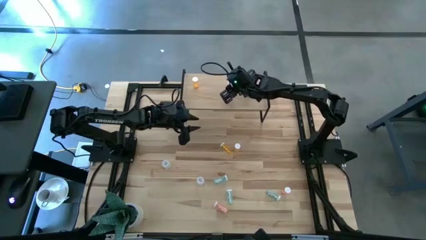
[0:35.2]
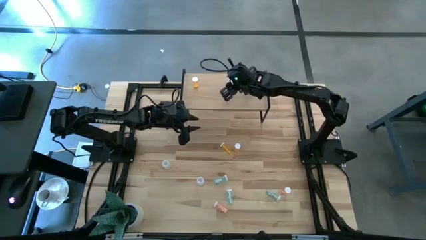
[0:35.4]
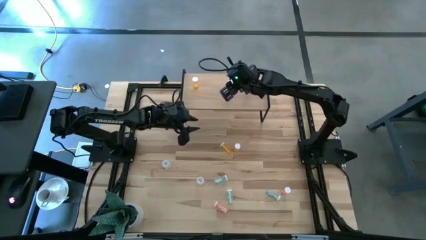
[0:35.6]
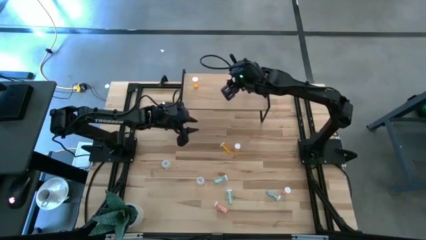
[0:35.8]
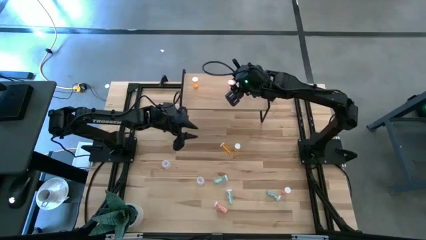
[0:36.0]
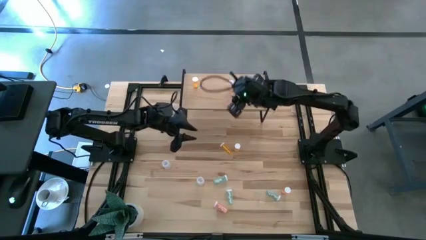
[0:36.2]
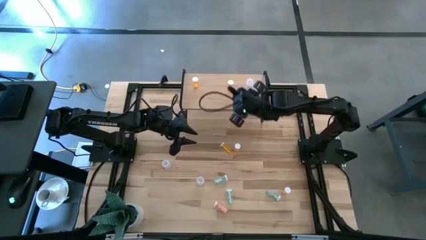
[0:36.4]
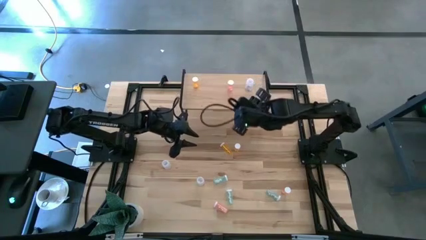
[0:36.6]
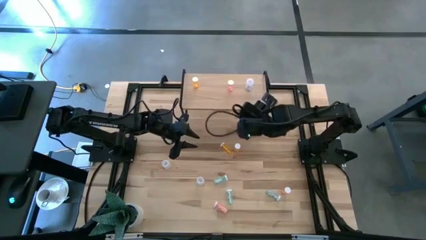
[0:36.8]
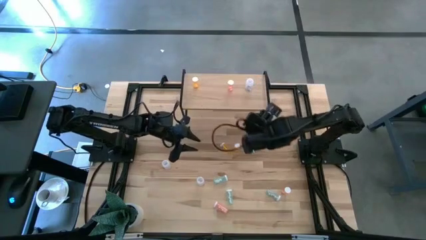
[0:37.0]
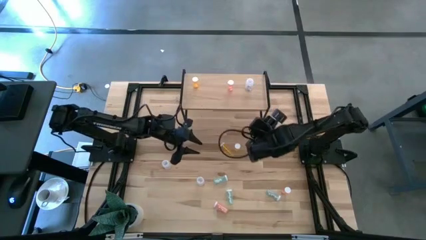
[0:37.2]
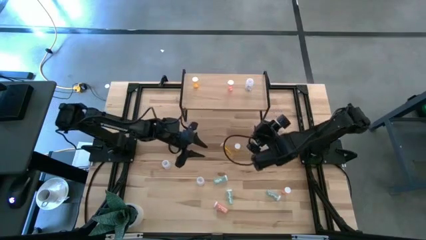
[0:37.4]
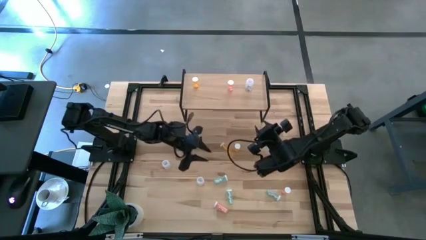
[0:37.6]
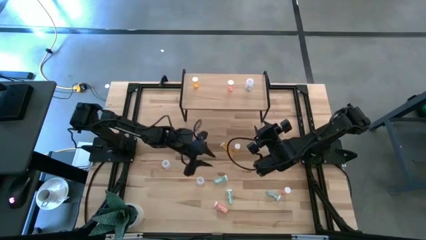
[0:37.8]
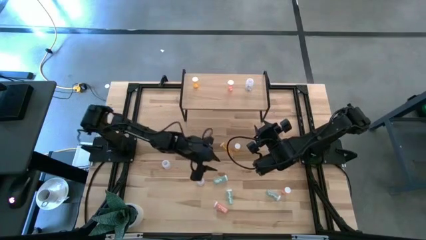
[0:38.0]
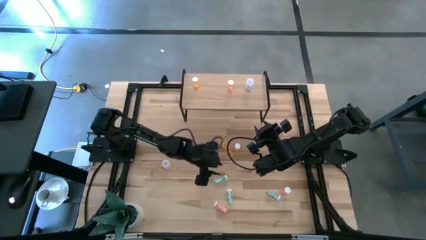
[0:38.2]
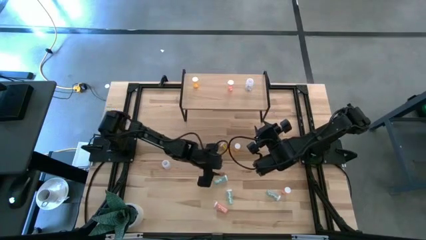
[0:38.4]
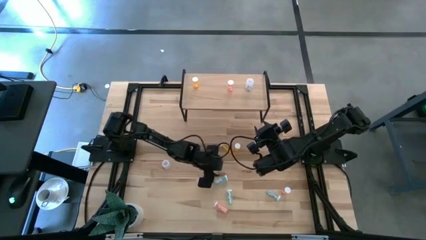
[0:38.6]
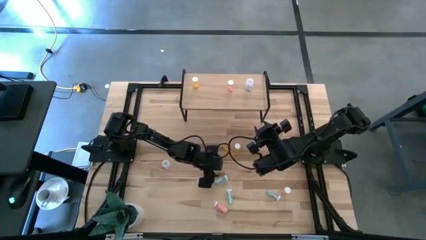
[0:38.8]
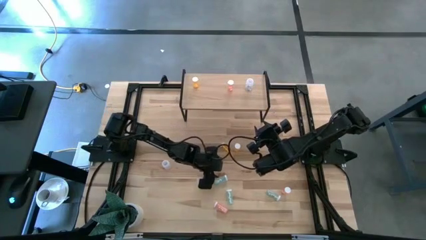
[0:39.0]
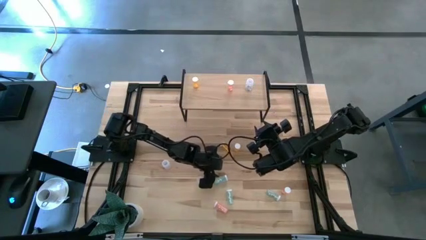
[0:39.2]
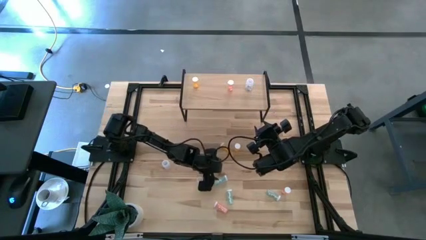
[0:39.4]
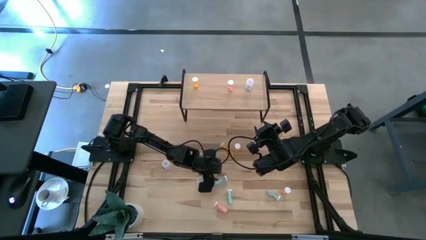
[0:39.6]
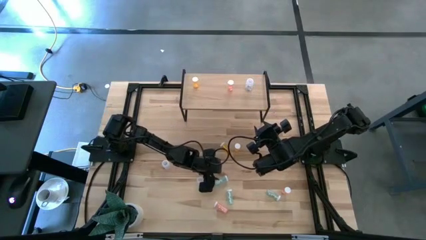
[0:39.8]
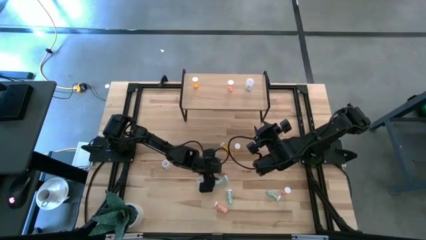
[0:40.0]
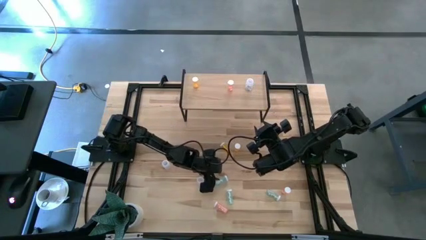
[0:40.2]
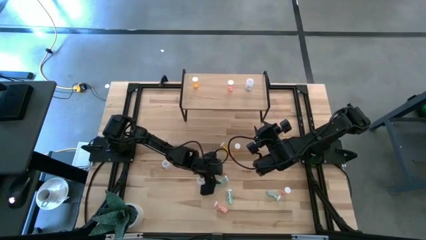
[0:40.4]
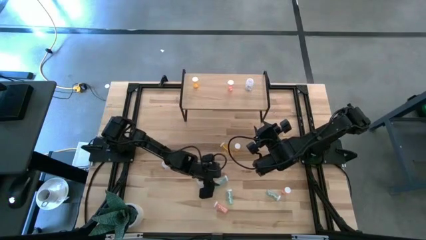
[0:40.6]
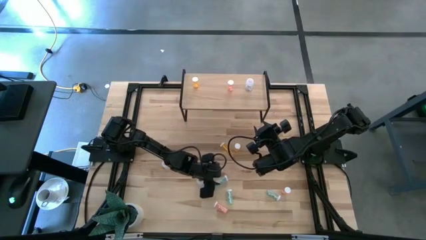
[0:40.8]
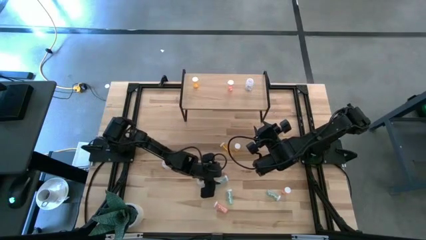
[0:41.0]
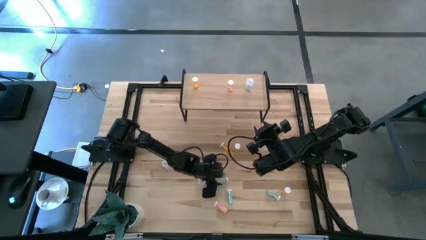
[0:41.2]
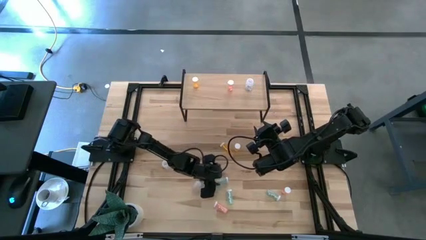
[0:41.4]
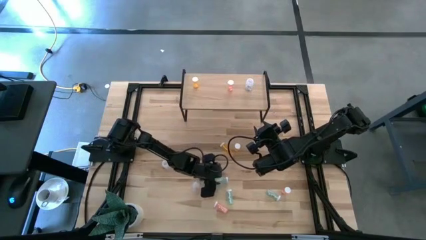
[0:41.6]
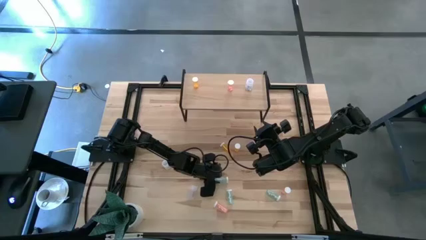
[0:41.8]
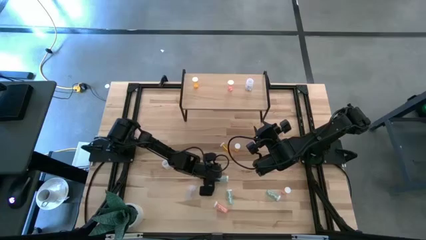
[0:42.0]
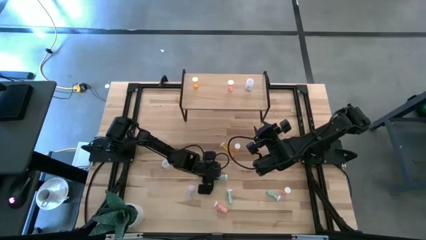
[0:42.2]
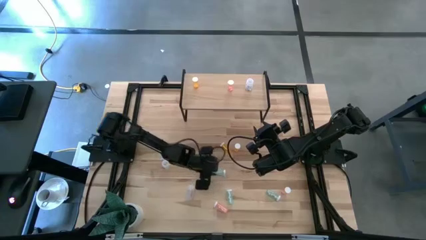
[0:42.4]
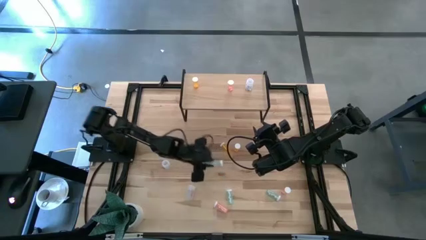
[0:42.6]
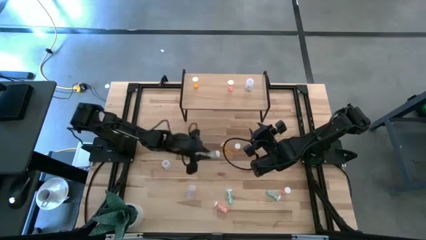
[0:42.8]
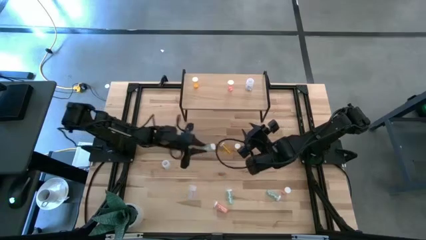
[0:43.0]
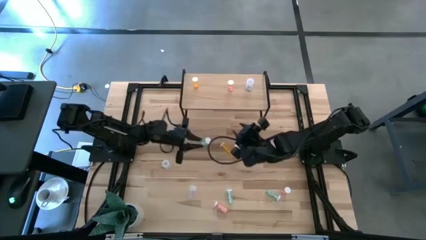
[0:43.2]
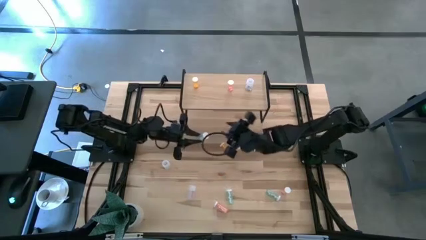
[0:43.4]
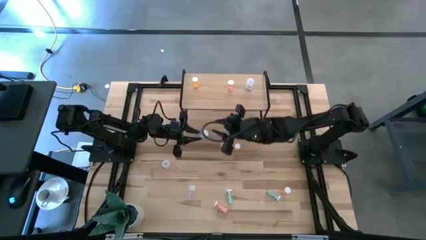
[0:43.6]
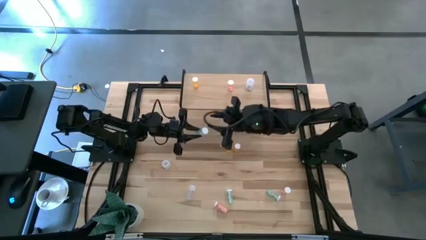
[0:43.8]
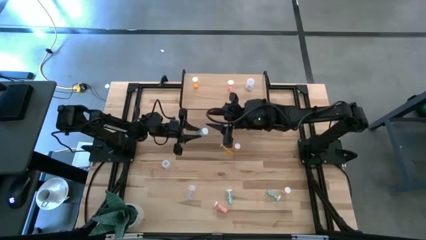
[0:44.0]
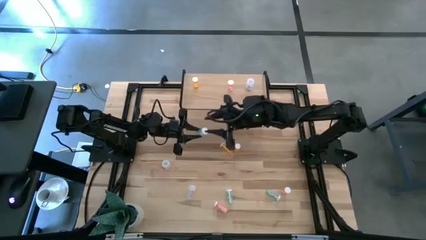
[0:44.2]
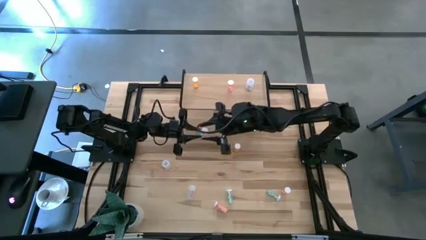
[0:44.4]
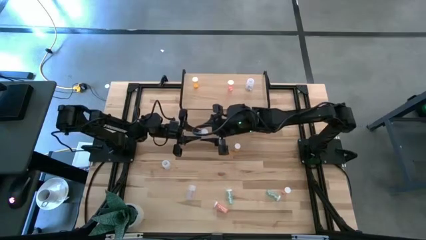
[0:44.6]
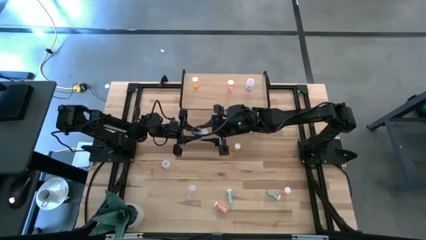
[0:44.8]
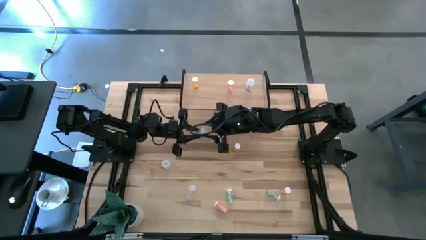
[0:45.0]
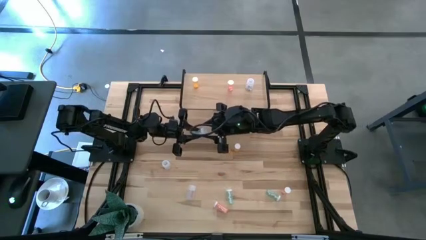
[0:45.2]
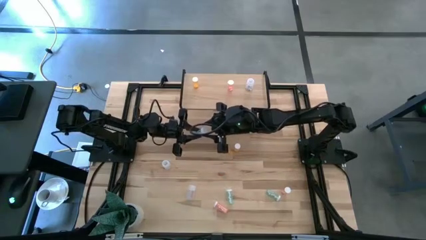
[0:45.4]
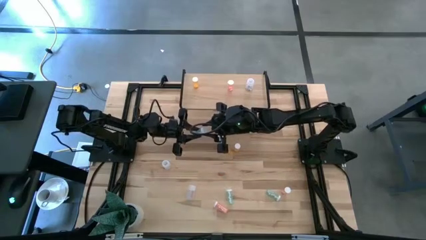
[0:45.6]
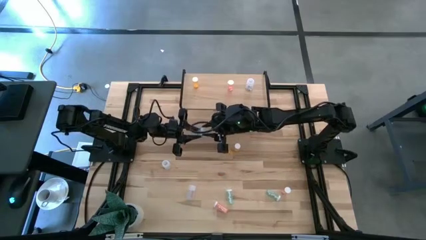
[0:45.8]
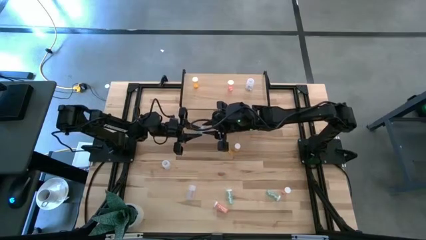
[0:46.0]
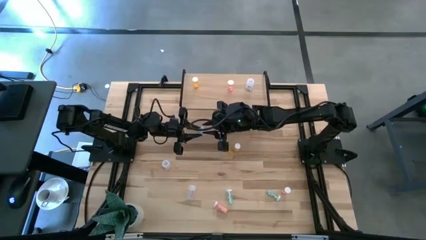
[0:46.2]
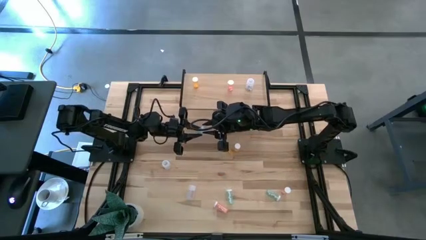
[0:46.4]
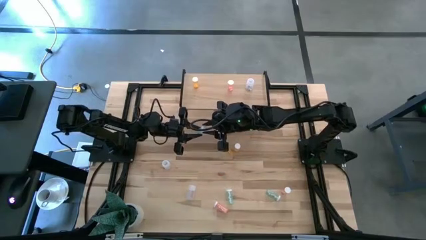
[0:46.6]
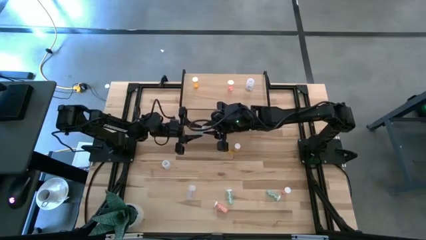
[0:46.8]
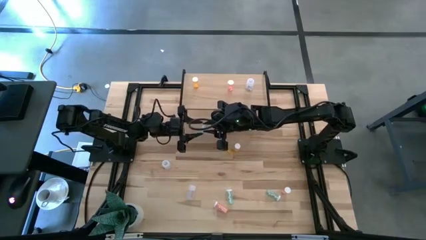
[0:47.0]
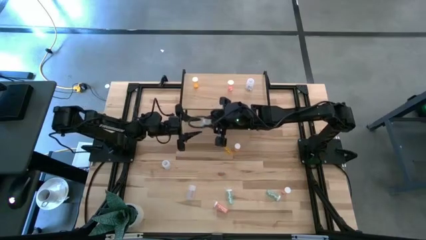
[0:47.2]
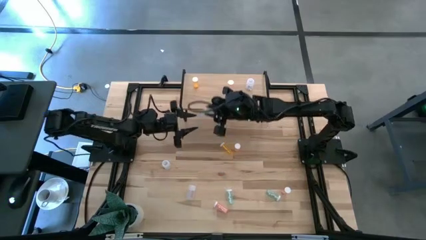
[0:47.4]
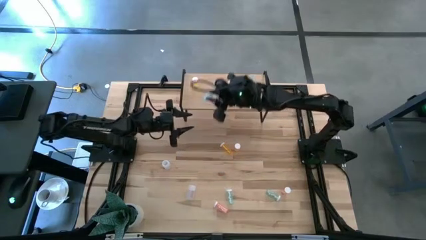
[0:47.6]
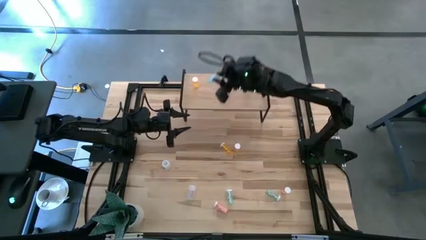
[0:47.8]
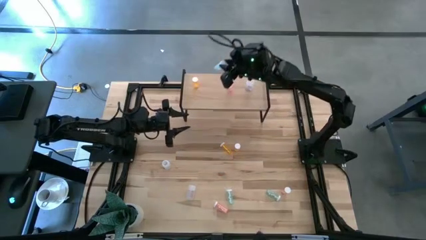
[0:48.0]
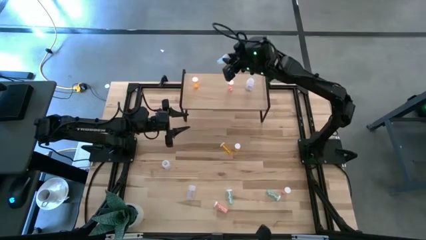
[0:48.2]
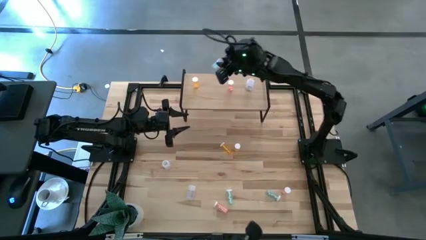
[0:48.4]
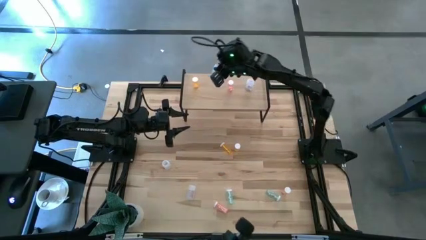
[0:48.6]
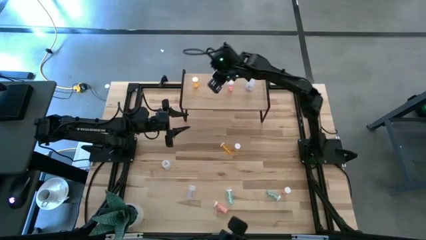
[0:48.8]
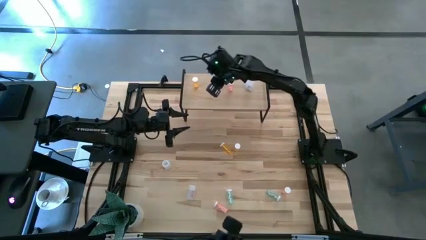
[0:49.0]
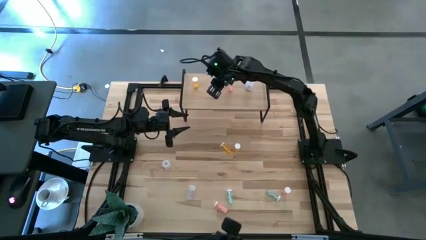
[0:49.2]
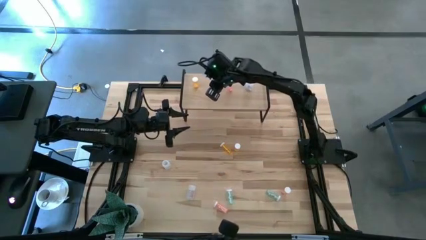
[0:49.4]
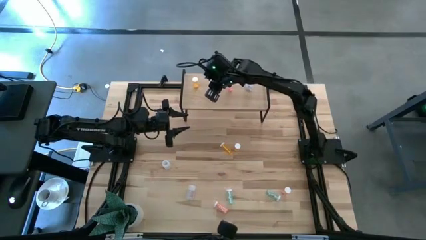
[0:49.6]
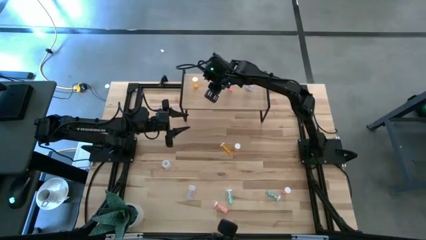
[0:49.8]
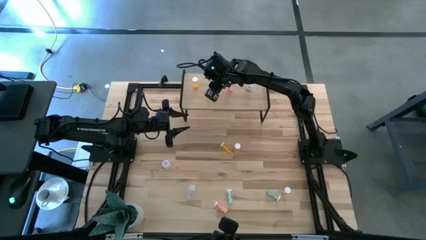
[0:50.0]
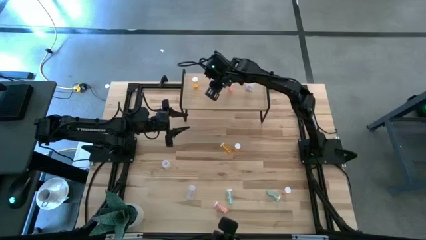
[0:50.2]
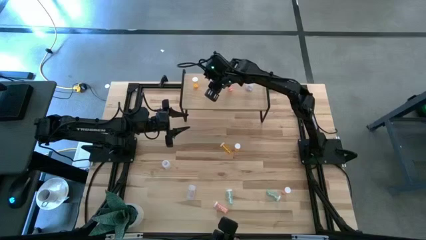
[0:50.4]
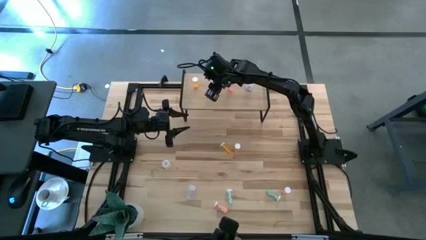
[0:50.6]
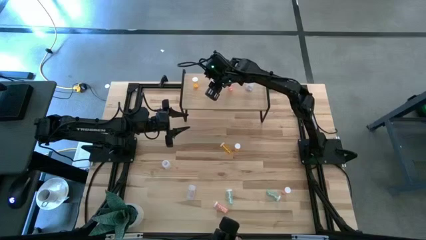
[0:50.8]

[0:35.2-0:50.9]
Task: Pick and place medicine bottles onto shelf by color
Put the blue pill bottle on the shelf
